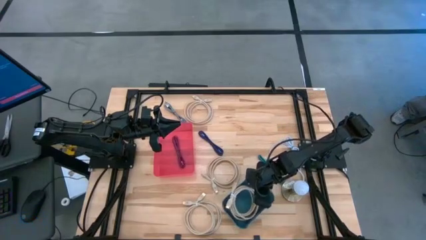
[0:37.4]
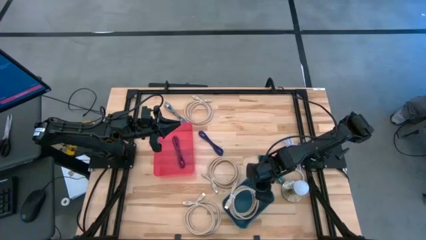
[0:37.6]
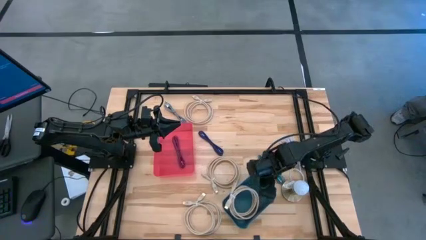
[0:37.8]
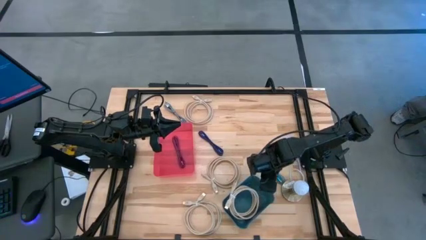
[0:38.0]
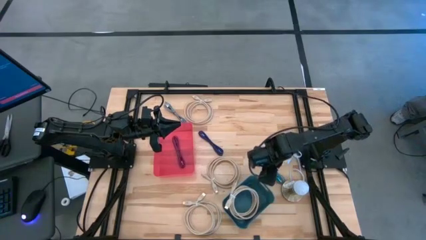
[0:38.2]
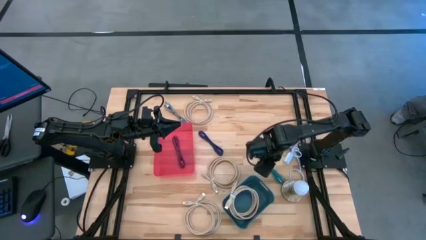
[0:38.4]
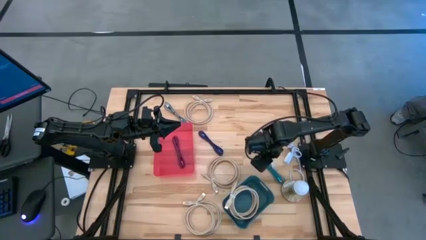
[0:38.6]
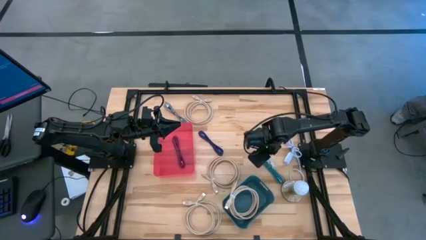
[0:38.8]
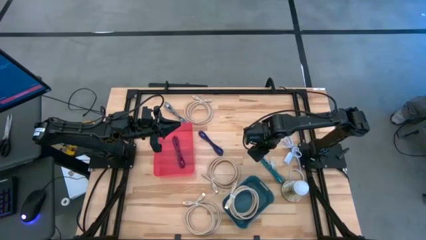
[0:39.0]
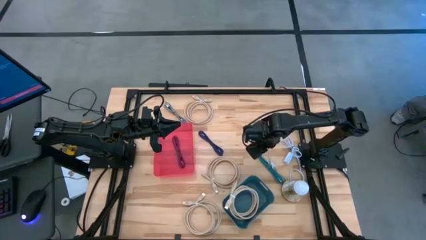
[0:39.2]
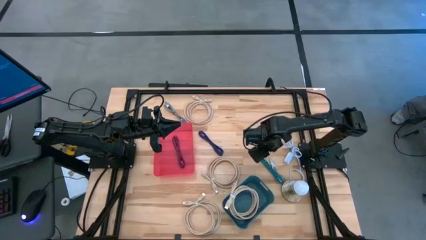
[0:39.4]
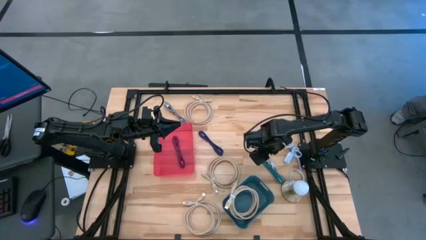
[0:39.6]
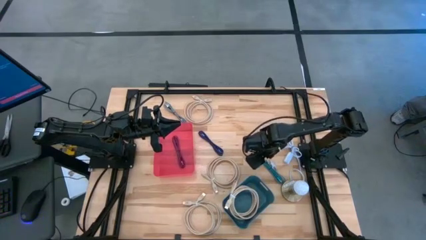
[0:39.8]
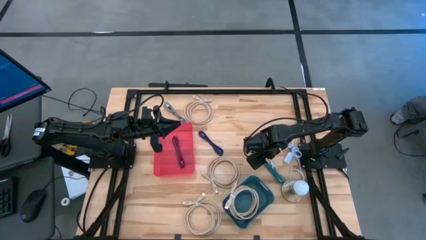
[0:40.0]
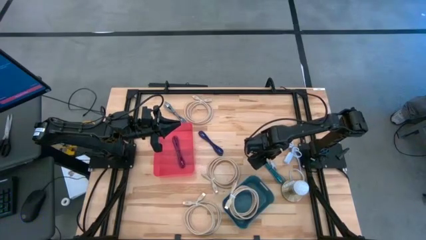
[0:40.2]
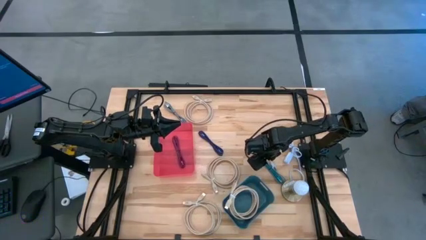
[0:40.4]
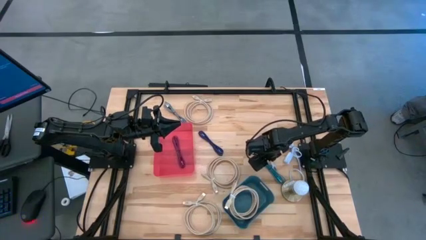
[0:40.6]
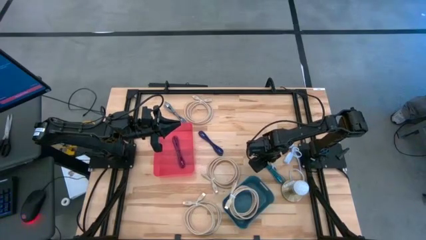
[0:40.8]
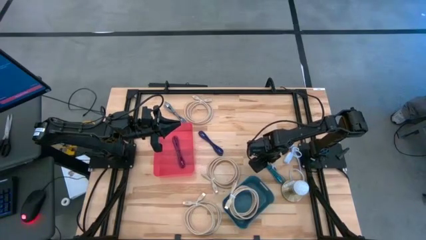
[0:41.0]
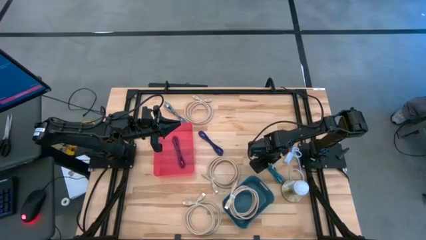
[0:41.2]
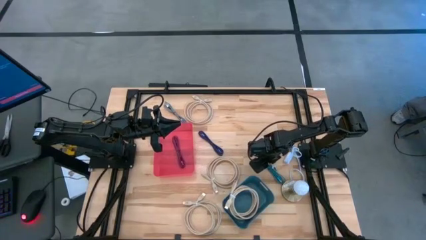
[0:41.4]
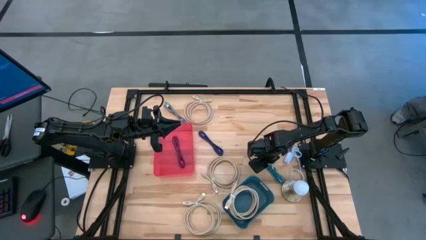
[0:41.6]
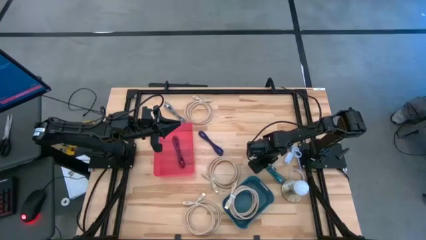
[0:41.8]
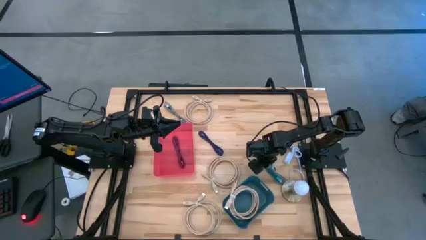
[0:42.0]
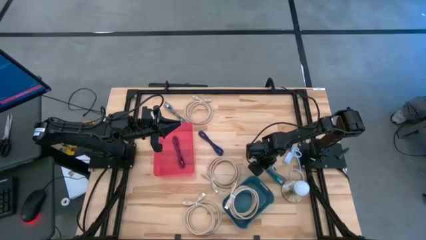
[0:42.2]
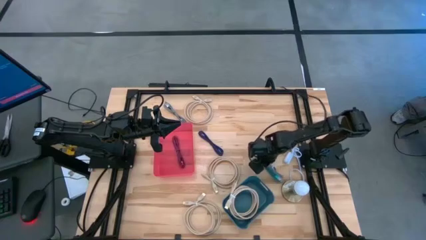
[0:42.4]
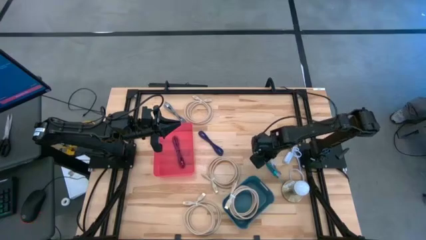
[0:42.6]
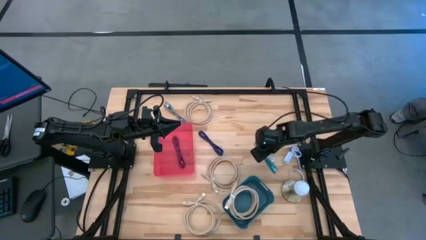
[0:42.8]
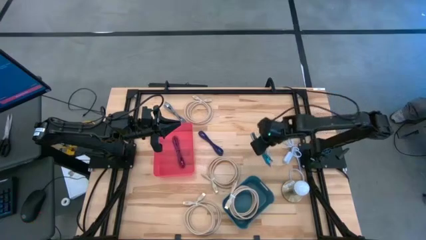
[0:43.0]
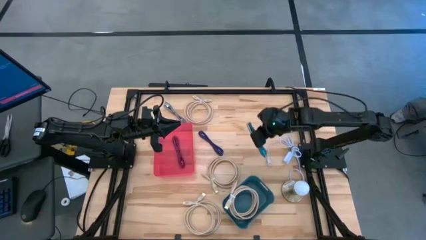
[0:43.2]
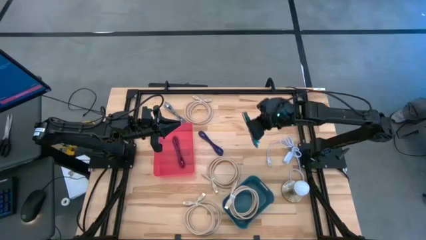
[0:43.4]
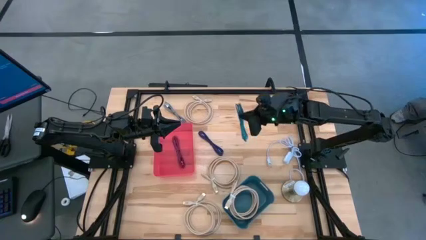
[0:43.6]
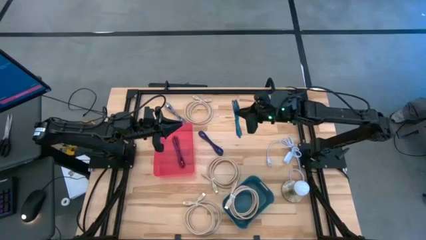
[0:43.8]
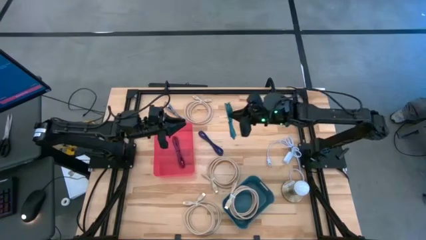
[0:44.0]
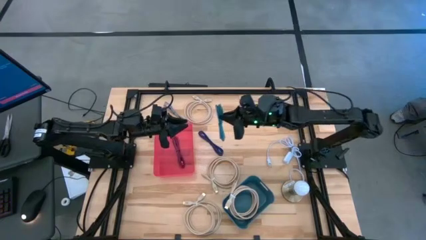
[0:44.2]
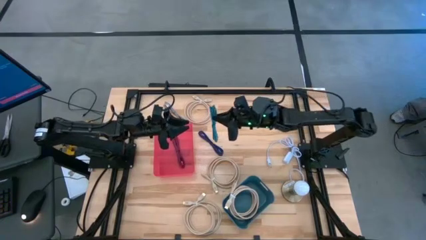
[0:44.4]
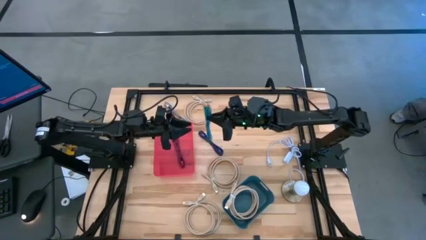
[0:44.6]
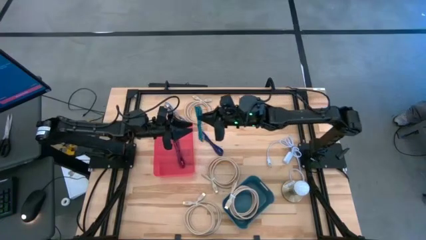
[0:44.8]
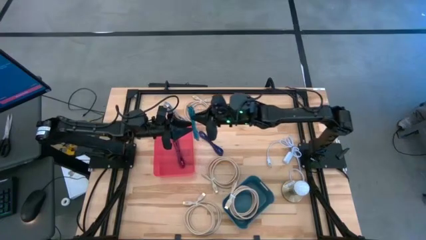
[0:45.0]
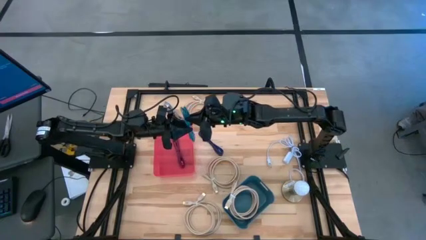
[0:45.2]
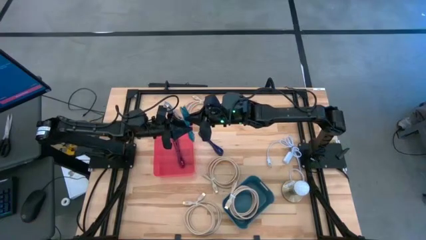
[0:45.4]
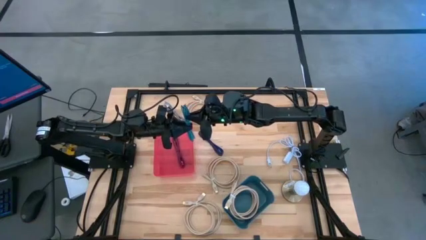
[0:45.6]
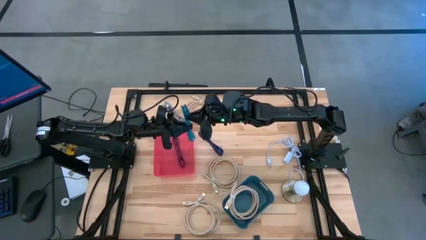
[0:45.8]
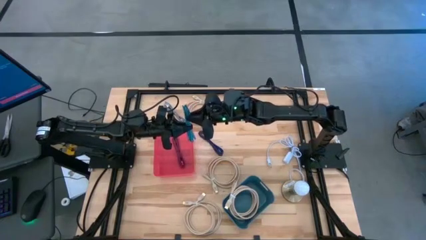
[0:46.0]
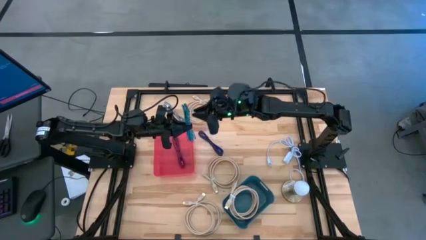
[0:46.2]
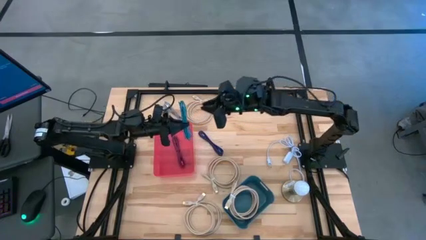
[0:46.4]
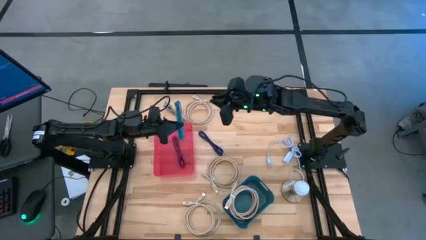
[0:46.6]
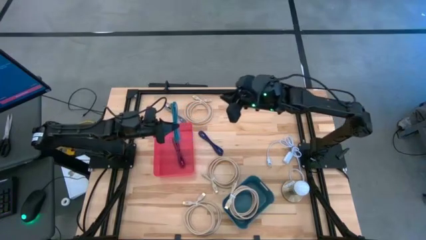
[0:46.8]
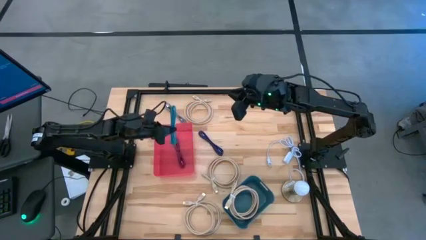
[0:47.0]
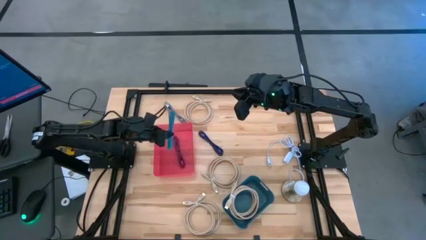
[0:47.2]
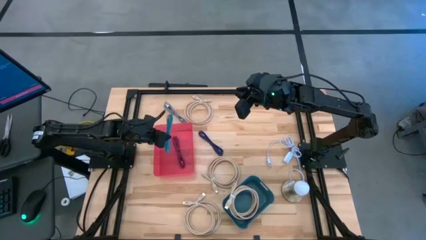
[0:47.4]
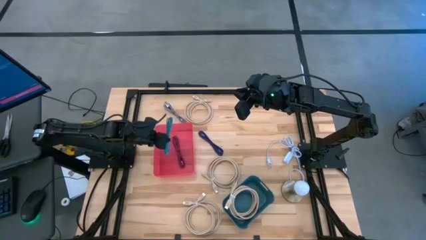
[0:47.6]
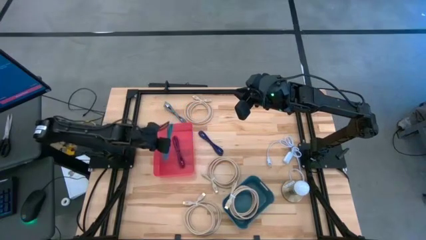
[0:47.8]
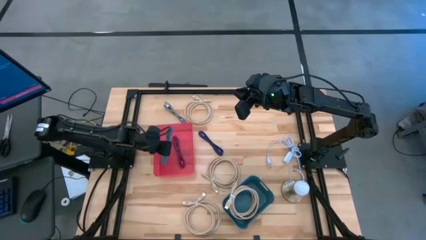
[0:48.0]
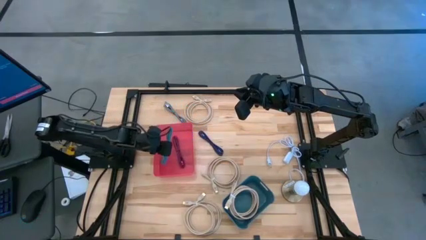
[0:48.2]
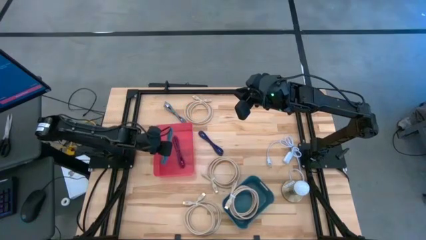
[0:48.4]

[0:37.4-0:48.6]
Task: Pick & Place USB Port
Put the blue charger cable into the red bin

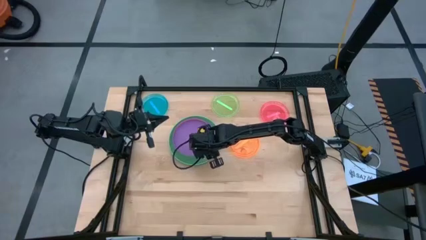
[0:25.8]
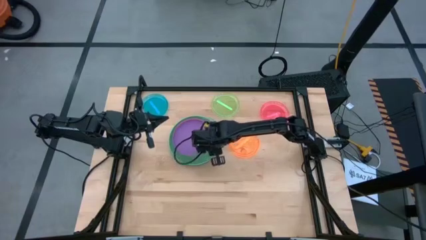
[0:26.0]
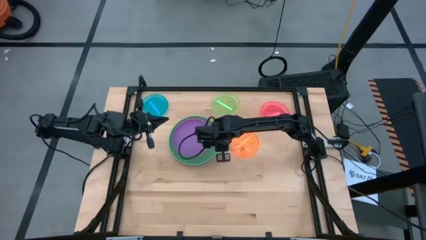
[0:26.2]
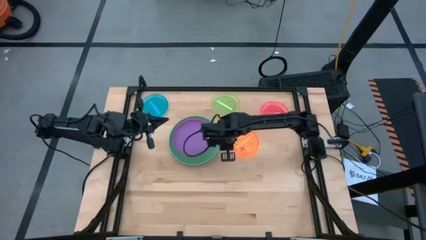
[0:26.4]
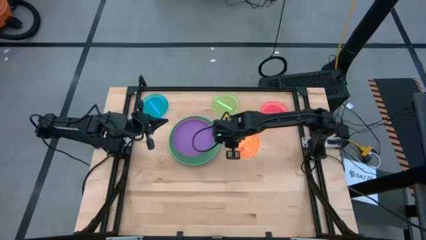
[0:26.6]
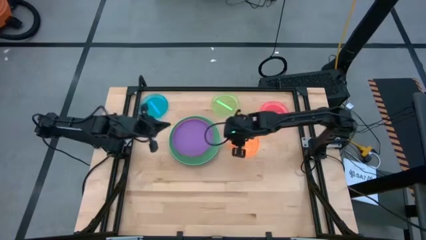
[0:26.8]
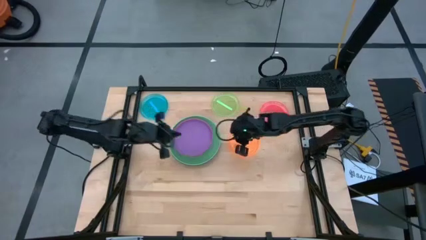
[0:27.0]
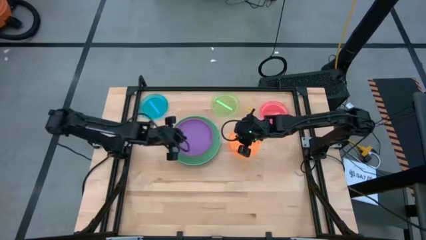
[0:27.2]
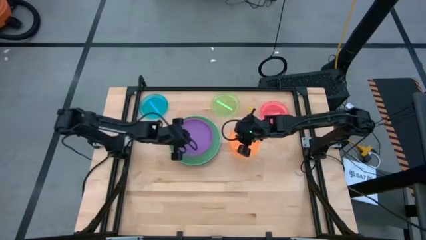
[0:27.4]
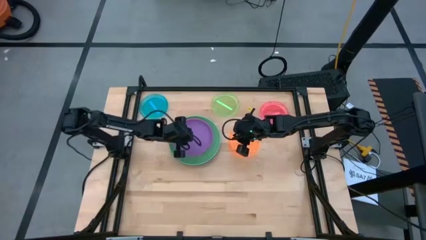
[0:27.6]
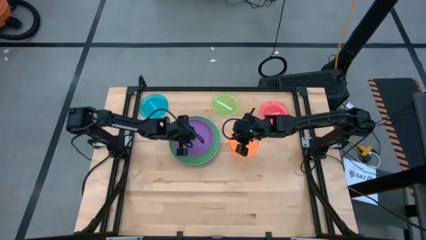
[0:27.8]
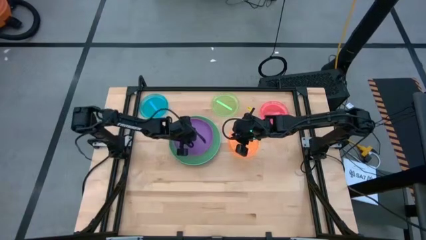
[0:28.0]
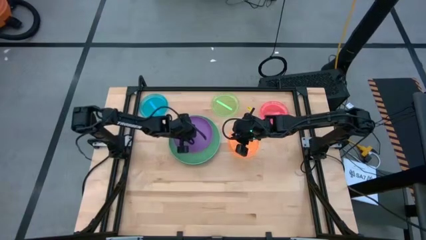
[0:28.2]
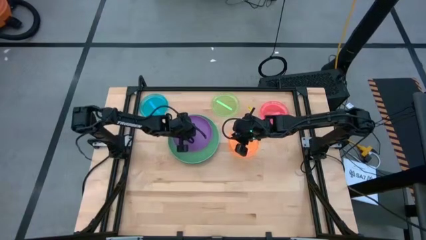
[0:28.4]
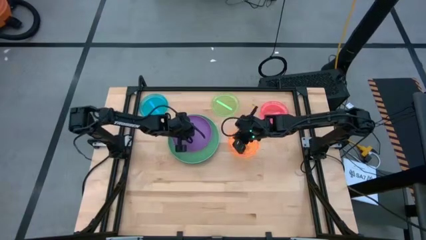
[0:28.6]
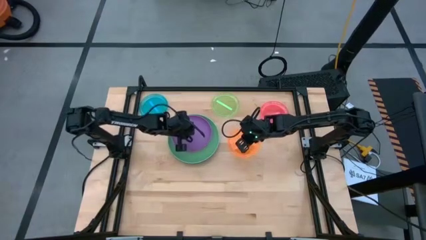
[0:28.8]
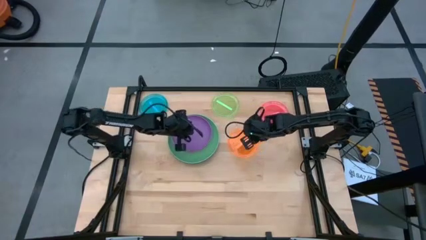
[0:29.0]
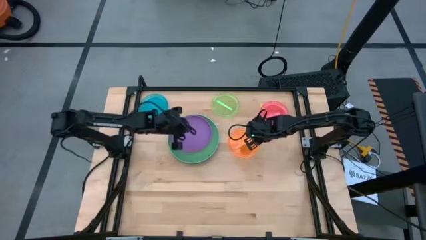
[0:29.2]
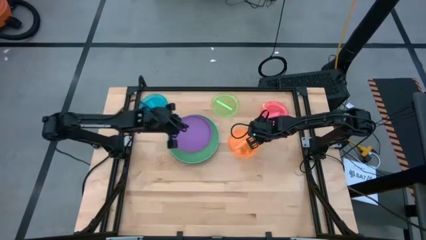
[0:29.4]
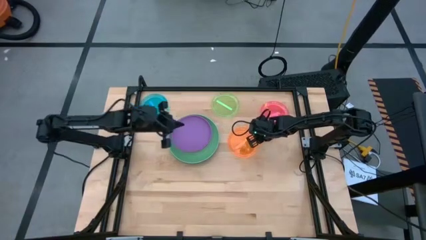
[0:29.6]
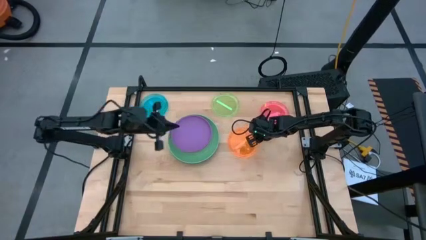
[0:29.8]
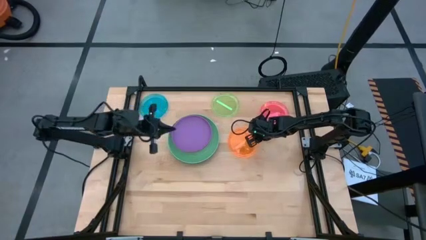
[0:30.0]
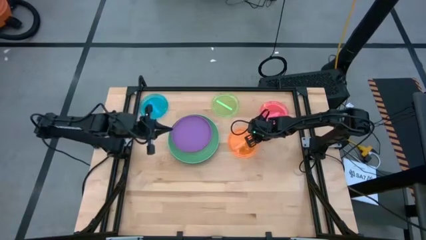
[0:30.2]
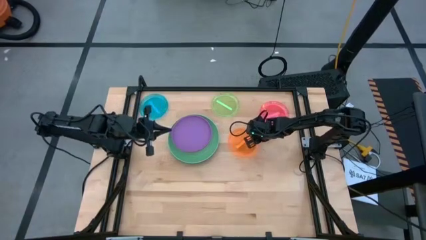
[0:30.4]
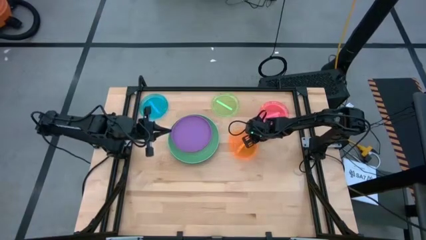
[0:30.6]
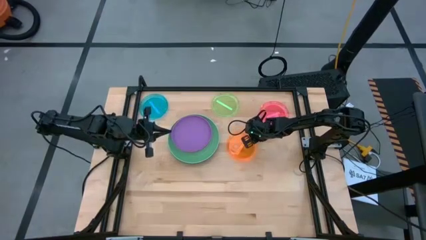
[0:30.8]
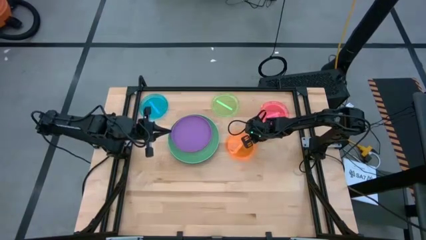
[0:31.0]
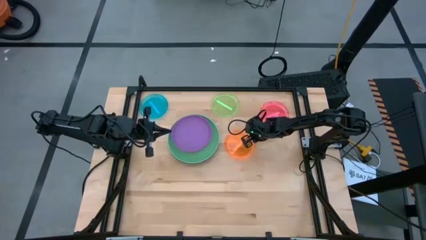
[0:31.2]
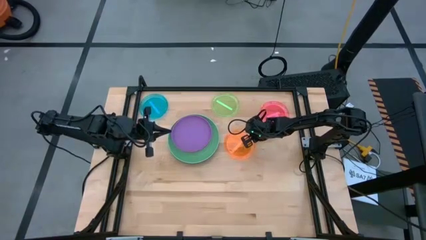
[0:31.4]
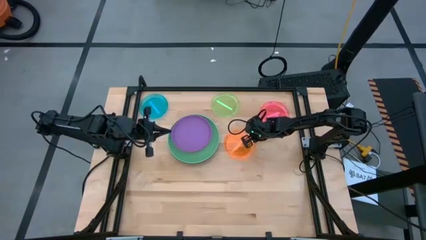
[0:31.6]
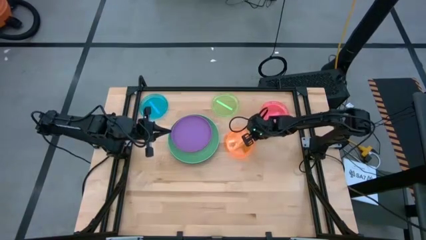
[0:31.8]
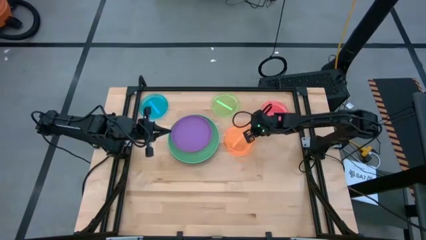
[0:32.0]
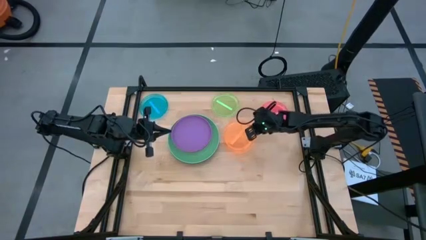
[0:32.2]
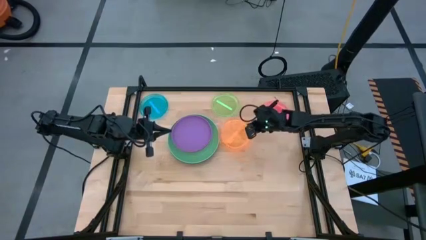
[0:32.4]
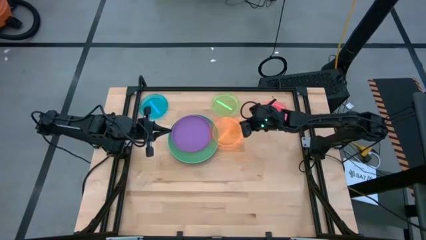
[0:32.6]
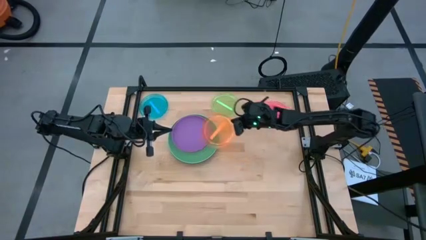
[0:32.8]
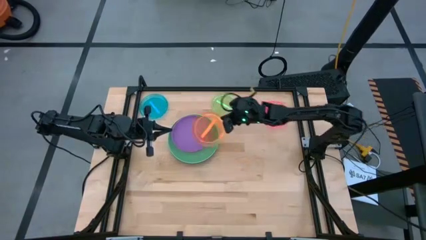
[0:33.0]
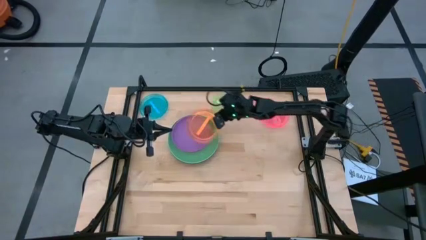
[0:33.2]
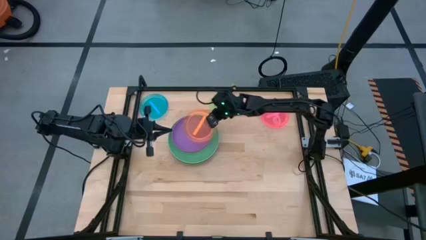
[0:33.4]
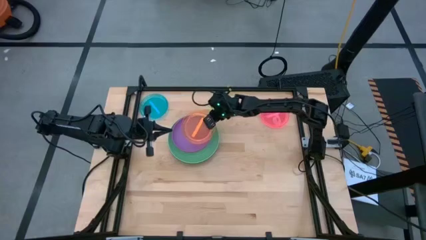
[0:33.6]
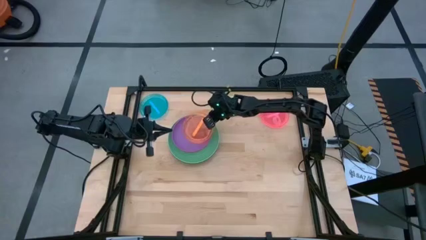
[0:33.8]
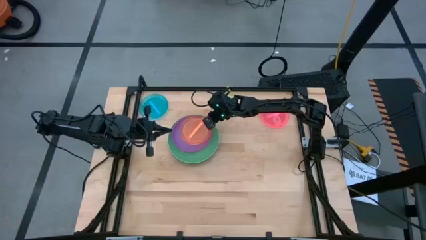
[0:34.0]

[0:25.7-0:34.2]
Task: Stack plastic plates
Stack the transparent orange plate on top of the purple plate
